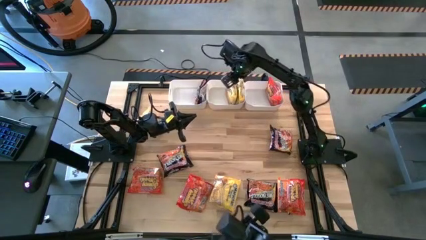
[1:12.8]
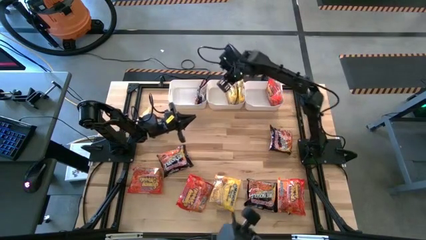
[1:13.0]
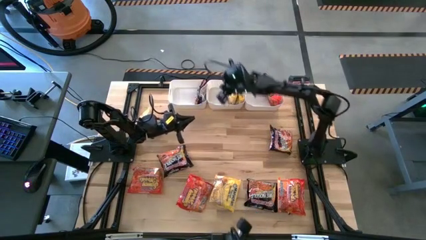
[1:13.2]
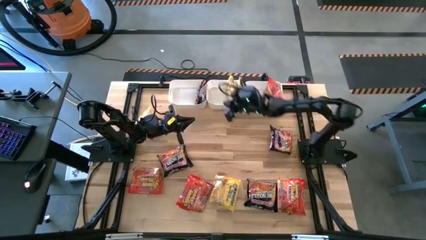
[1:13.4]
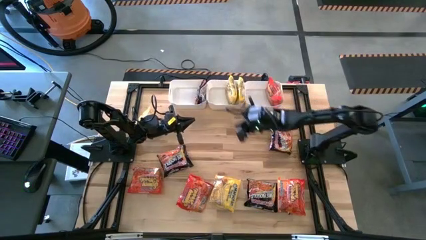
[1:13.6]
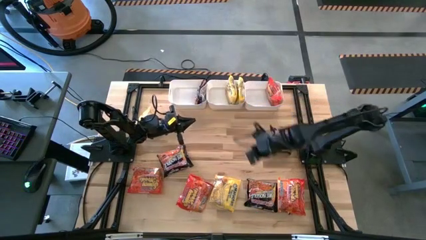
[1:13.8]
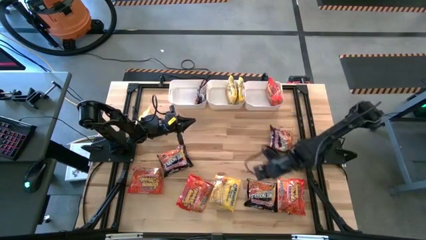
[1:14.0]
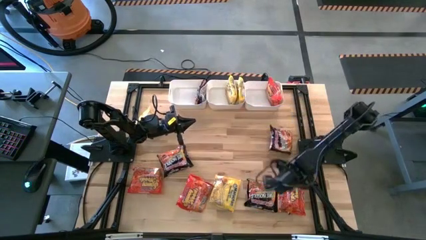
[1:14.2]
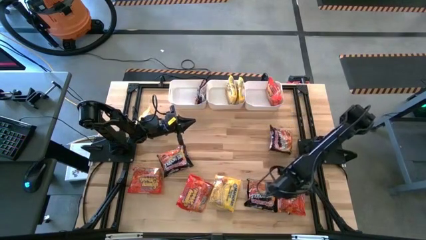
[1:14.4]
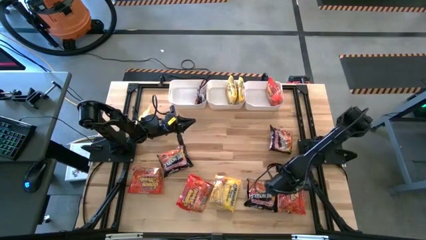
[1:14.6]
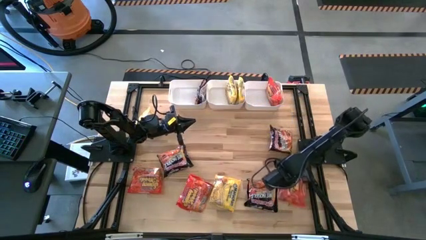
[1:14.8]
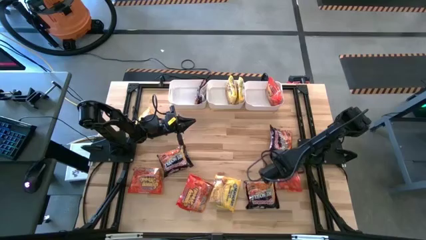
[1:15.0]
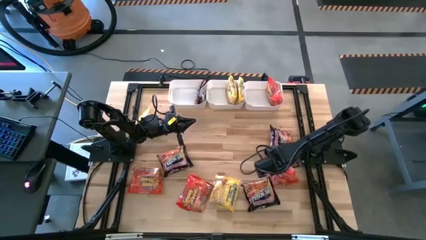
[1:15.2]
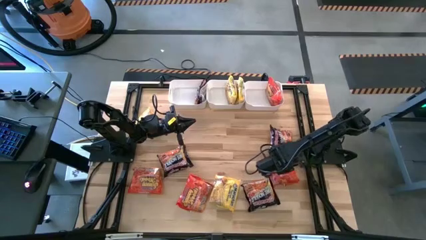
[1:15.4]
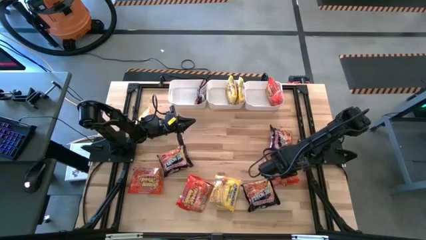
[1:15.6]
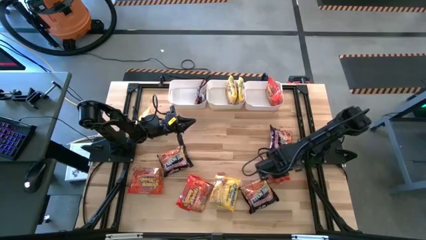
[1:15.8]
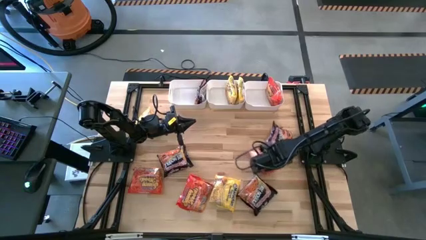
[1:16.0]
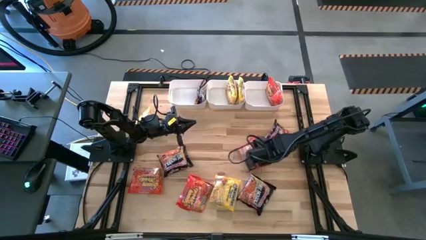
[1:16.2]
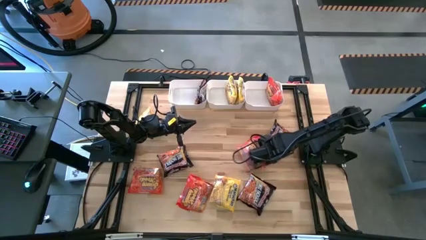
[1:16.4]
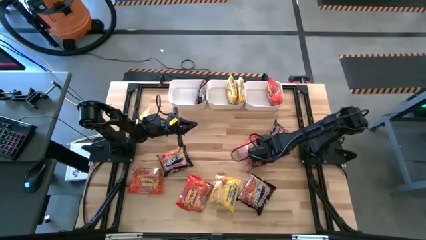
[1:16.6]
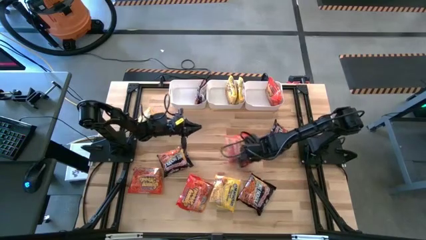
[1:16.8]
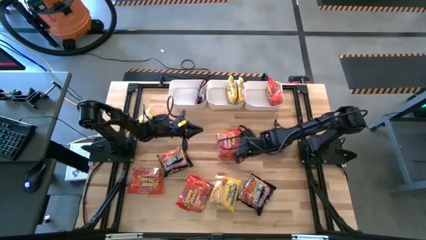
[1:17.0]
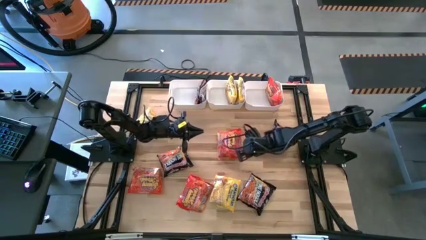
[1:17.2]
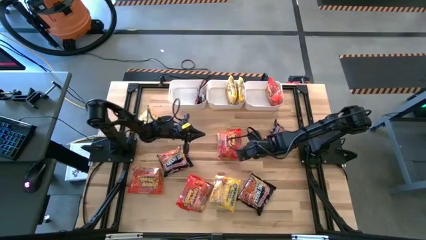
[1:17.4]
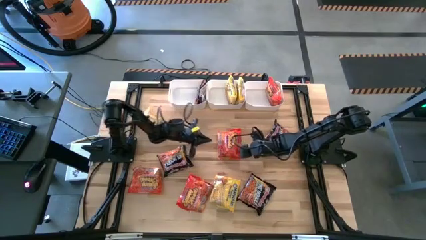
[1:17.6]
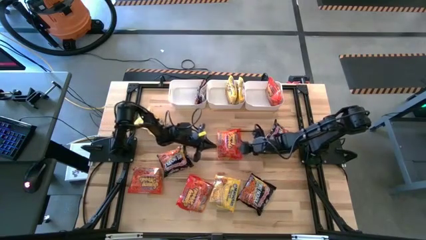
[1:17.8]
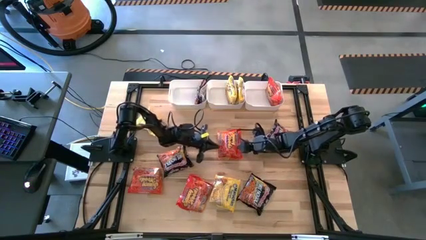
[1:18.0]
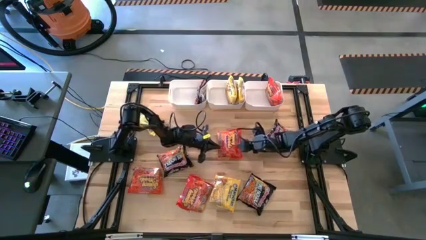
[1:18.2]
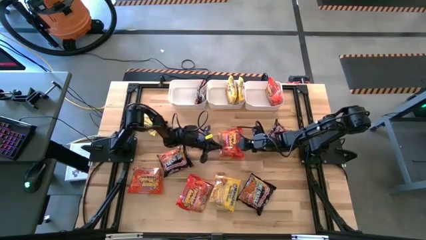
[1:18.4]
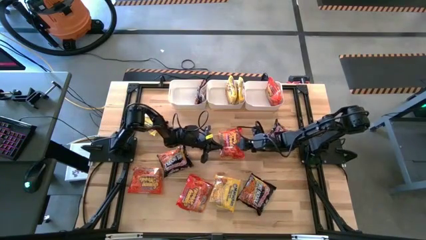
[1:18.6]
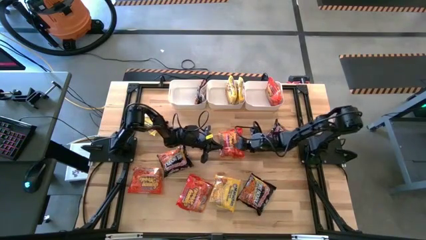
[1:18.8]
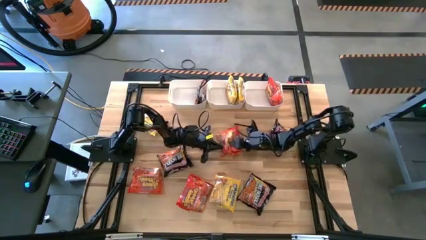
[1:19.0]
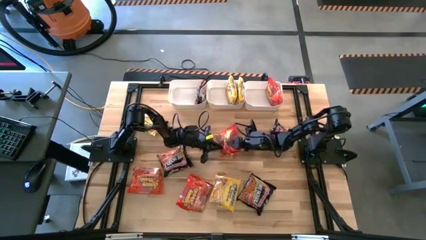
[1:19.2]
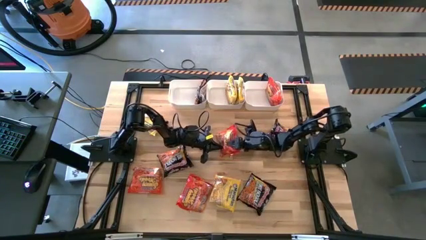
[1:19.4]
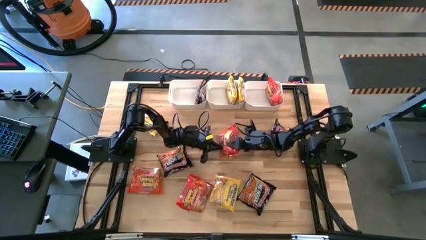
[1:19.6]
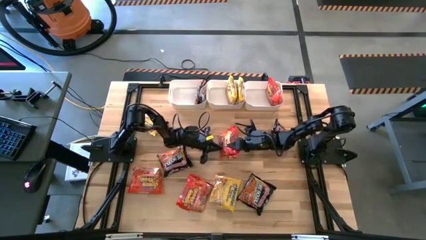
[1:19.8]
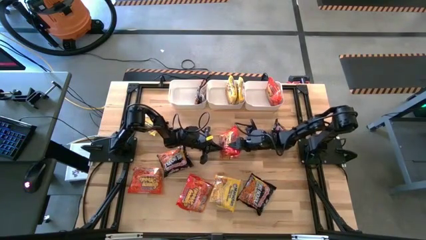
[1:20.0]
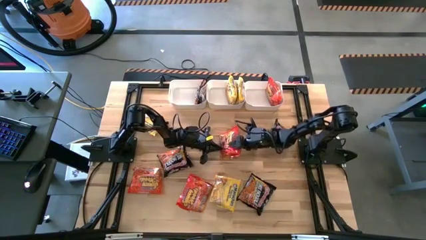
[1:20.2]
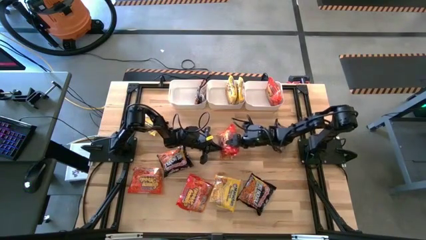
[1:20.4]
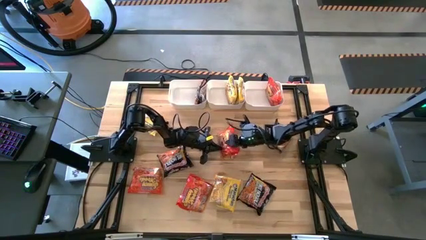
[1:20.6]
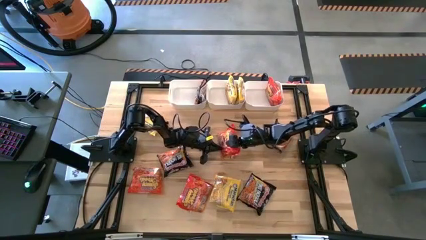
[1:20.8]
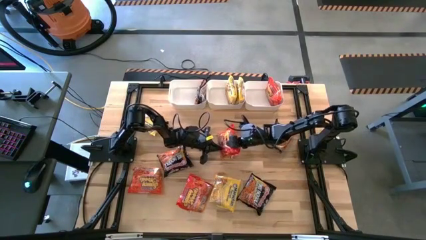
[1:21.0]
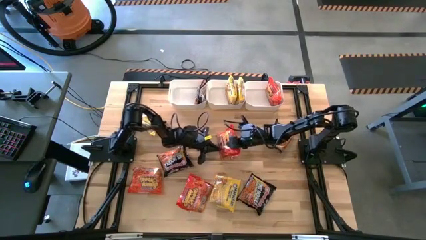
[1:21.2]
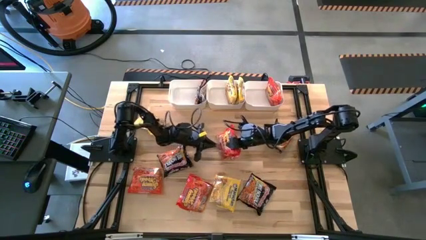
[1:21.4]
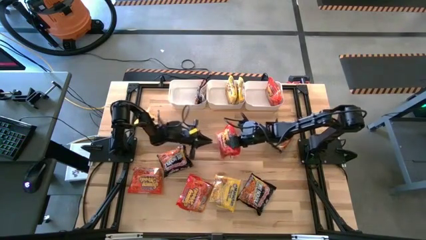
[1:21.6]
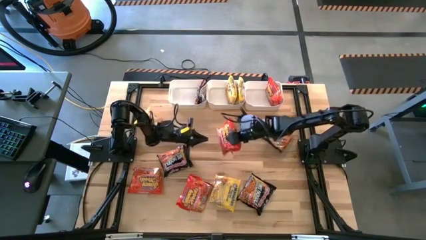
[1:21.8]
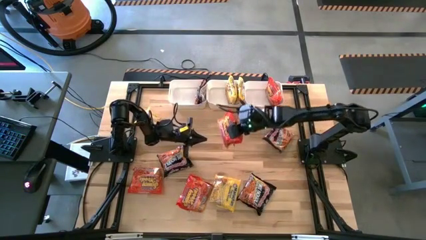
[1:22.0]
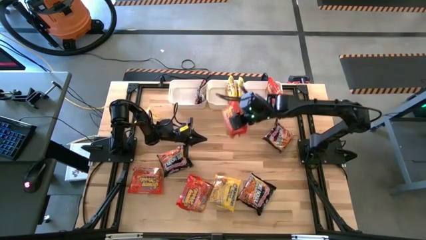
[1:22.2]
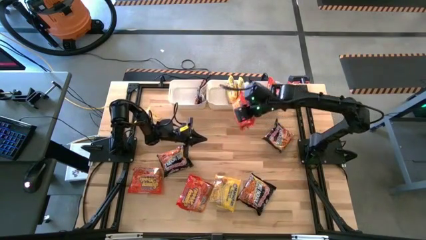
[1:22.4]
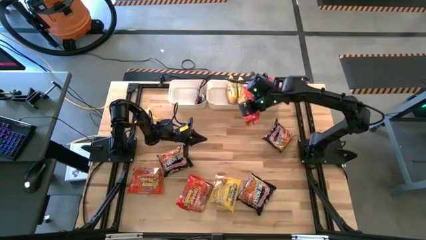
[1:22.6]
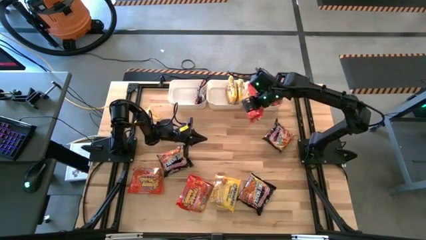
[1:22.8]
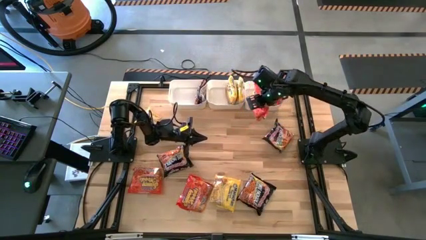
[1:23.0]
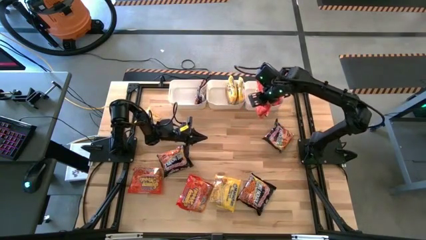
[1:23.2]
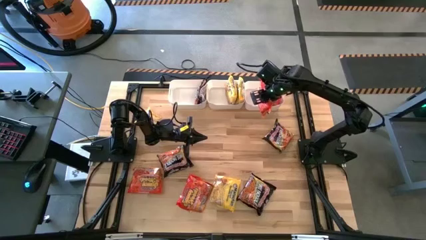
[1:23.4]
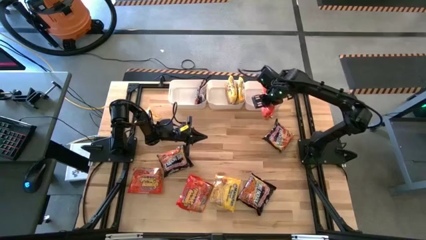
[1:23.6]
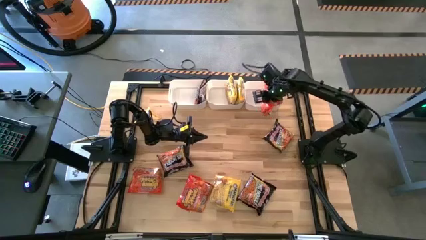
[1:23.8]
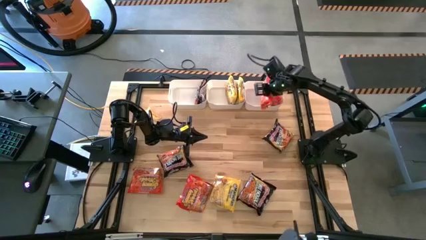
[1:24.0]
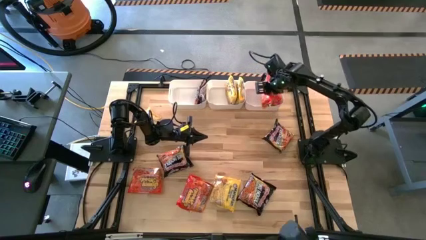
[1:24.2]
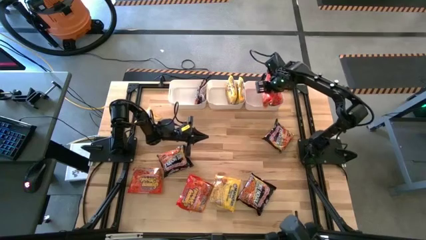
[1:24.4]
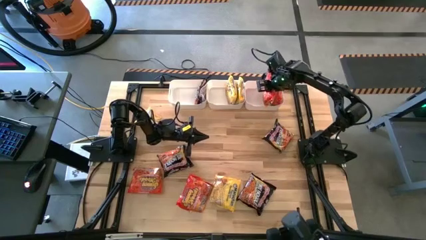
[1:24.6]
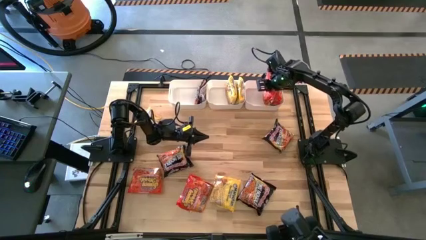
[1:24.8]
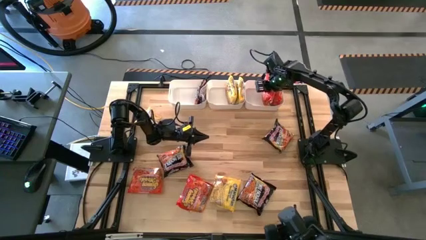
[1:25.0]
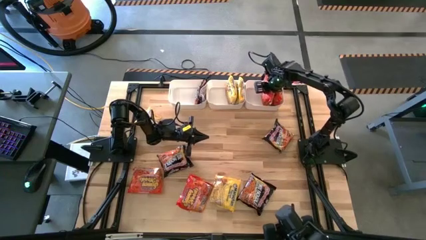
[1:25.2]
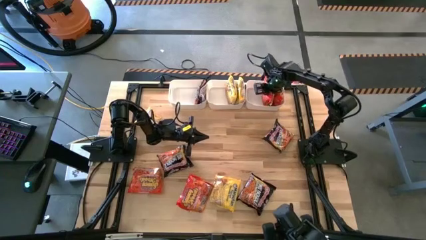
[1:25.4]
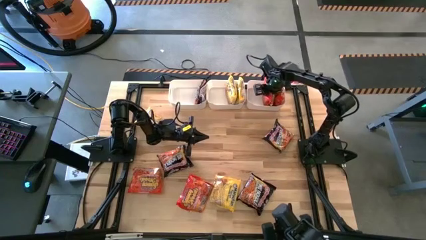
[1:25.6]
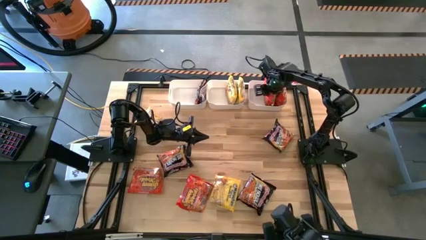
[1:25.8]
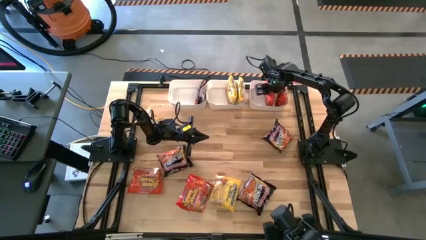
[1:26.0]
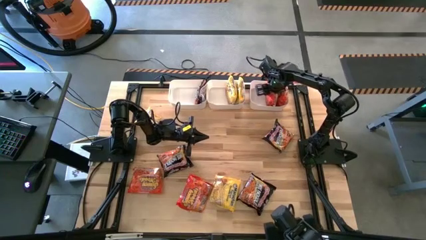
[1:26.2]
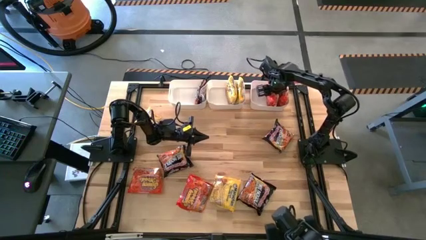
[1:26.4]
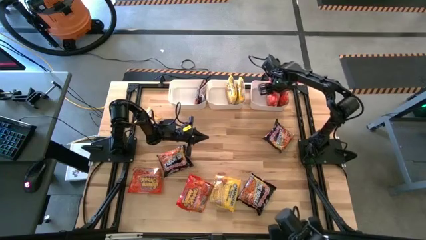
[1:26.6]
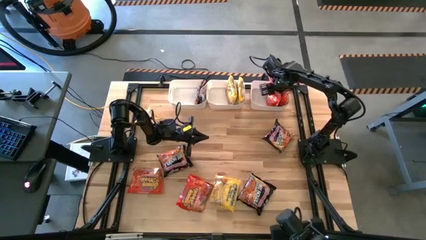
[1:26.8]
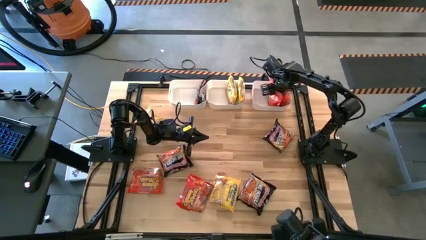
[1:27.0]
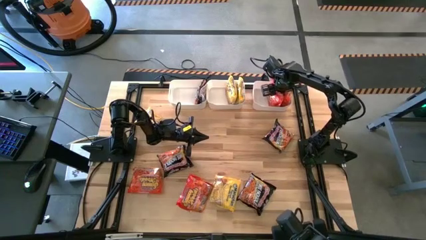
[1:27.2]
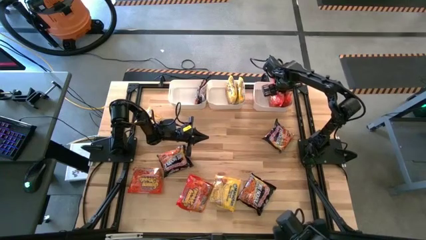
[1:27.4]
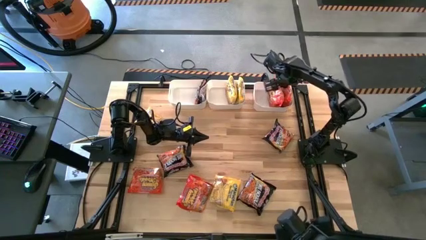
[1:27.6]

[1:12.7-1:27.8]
Task: Sort Maruchan noodles
Put the orange noodle into the right white bin

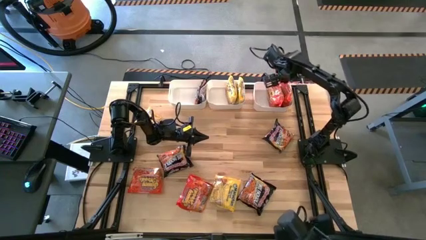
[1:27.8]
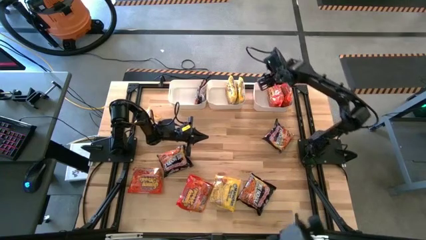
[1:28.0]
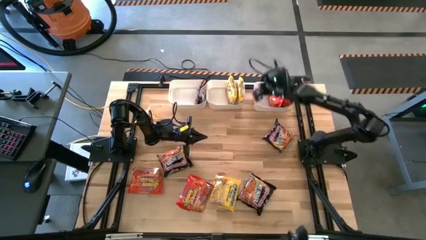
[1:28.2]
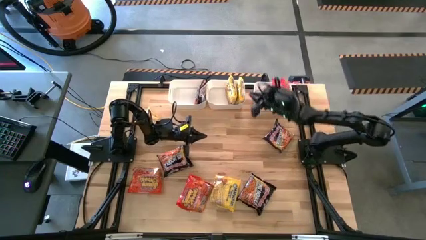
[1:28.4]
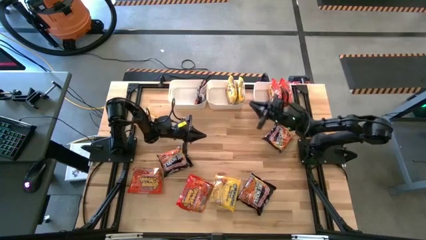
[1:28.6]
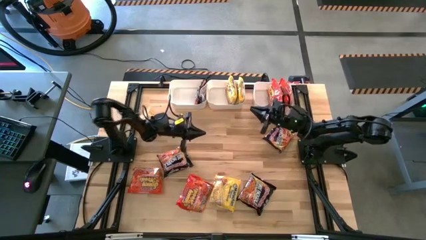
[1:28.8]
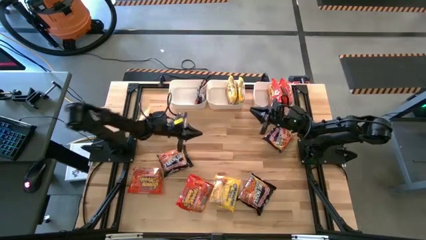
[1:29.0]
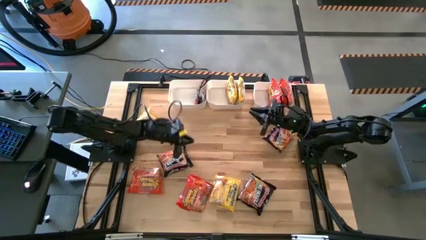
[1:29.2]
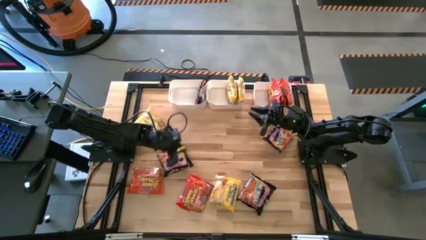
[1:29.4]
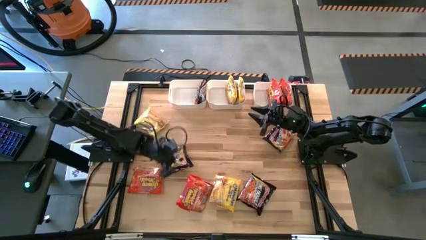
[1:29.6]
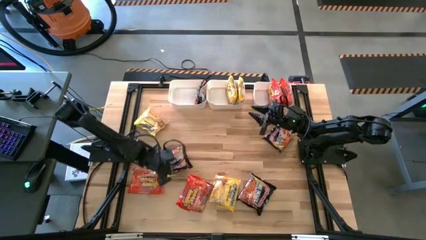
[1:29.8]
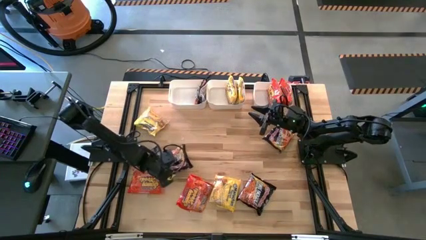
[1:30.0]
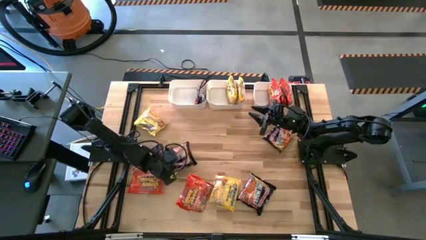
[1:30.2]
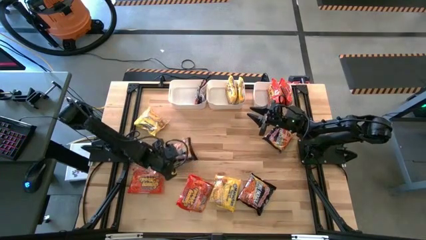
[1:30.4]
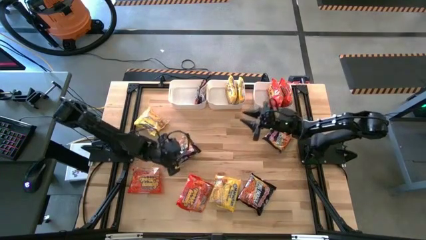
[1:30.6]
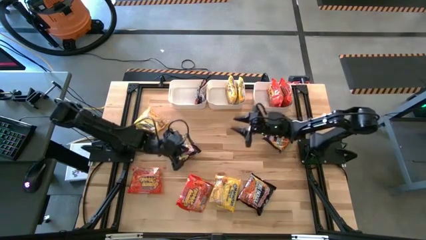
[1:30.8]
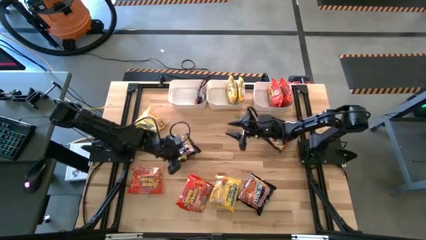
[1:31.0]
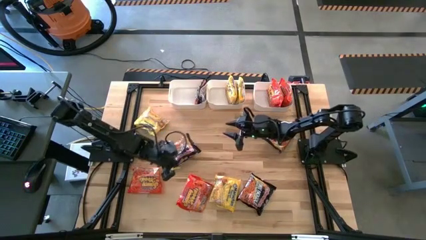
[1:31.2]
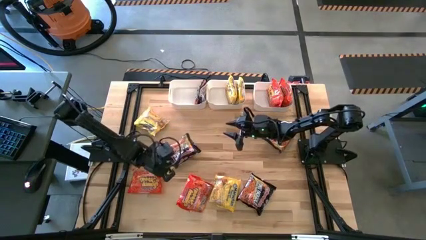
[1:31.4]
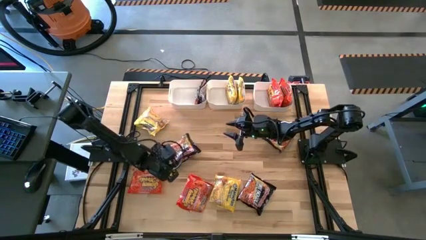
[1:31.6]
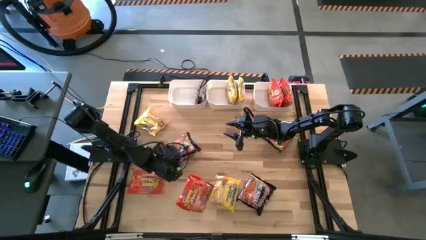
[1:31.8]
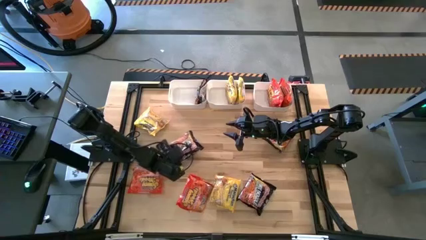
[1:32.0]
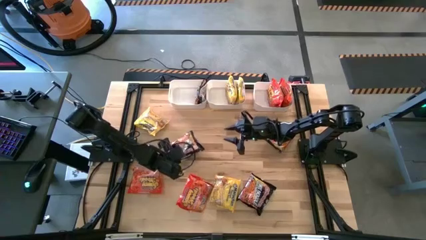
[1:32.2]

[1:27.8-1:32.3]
Put the black noodle into the left white bin
